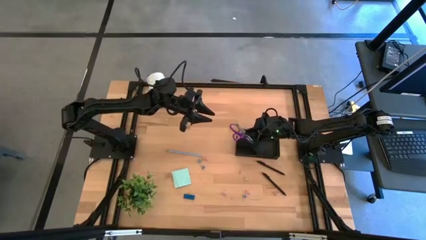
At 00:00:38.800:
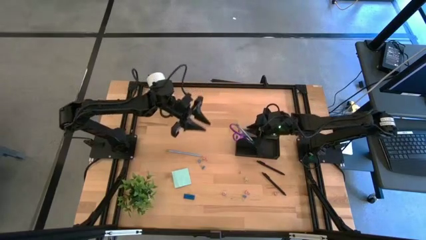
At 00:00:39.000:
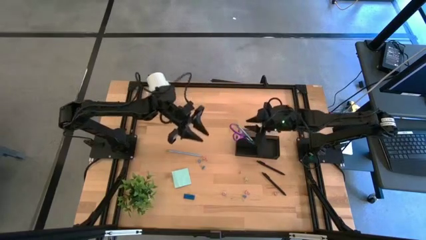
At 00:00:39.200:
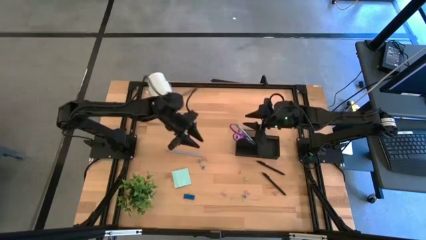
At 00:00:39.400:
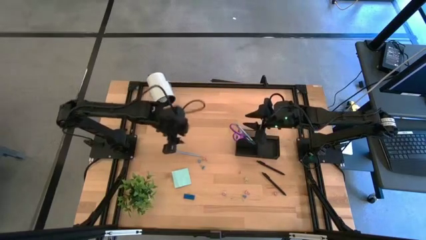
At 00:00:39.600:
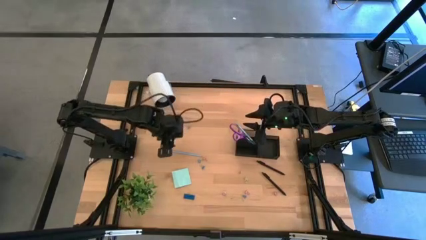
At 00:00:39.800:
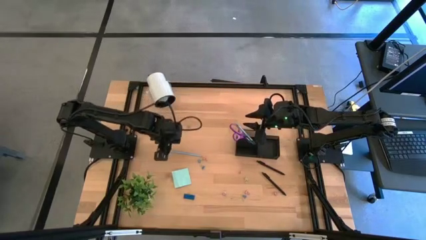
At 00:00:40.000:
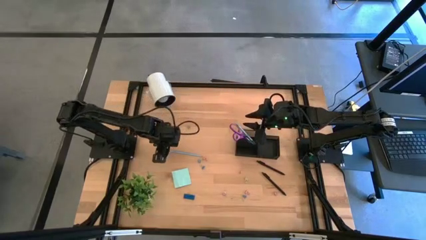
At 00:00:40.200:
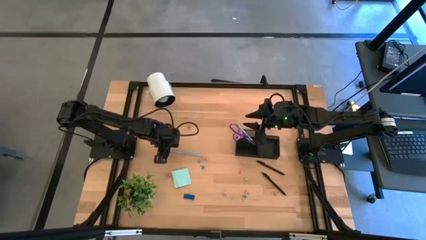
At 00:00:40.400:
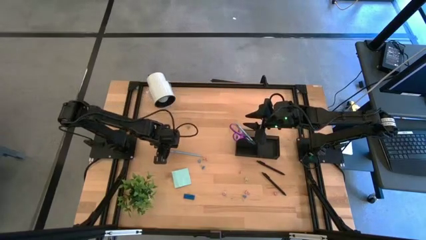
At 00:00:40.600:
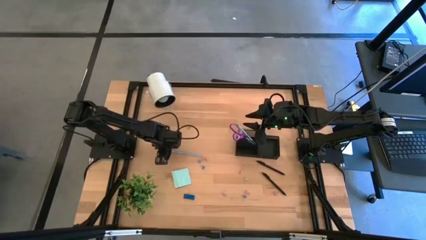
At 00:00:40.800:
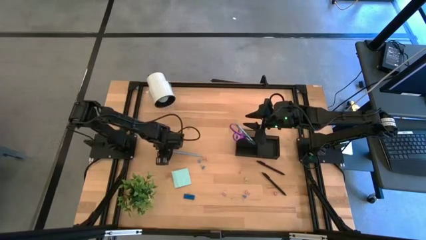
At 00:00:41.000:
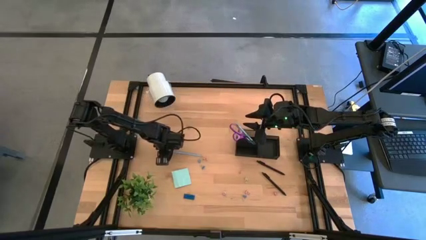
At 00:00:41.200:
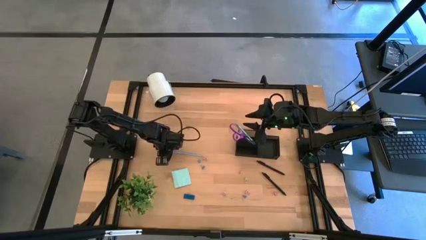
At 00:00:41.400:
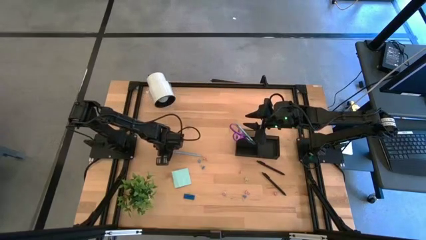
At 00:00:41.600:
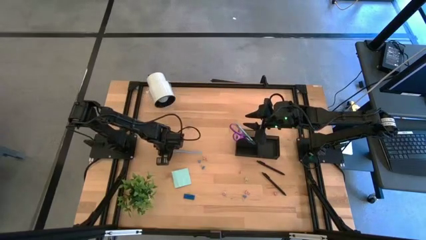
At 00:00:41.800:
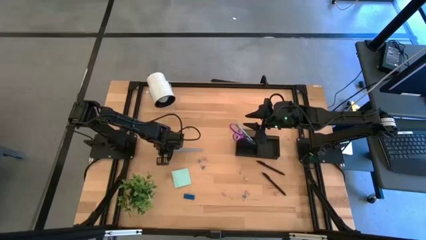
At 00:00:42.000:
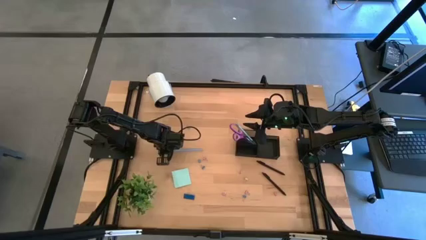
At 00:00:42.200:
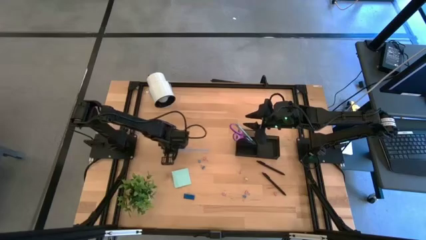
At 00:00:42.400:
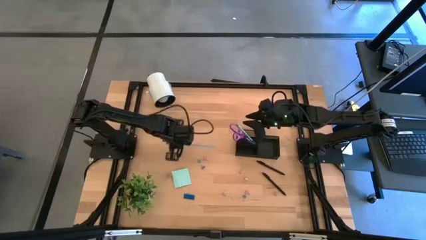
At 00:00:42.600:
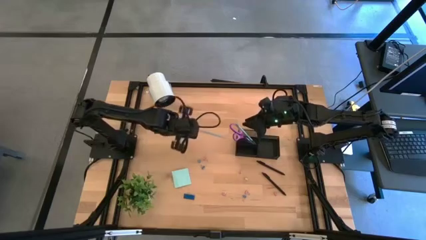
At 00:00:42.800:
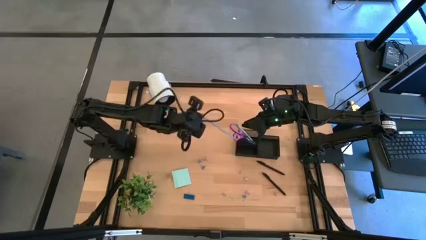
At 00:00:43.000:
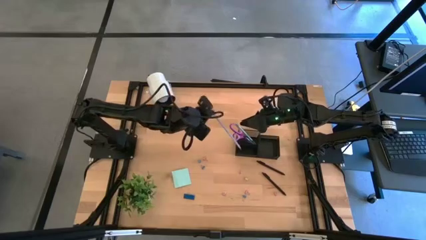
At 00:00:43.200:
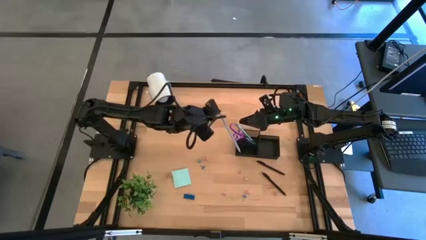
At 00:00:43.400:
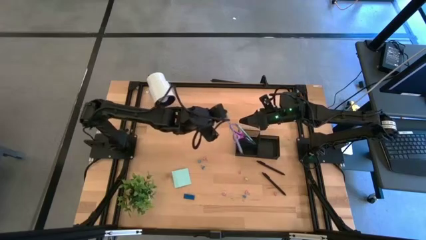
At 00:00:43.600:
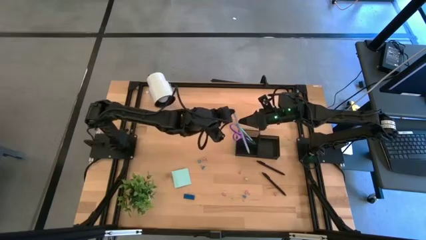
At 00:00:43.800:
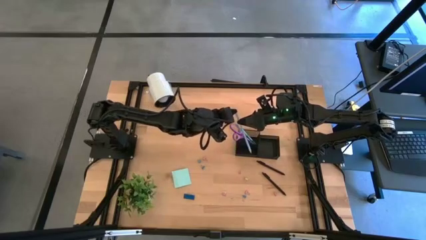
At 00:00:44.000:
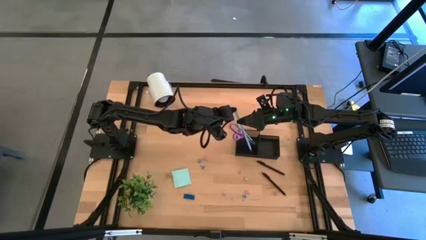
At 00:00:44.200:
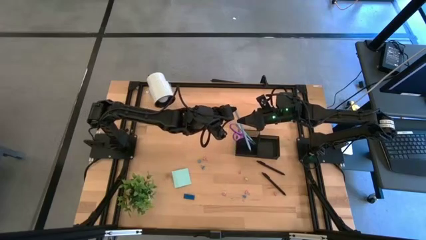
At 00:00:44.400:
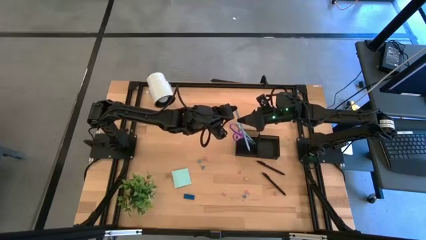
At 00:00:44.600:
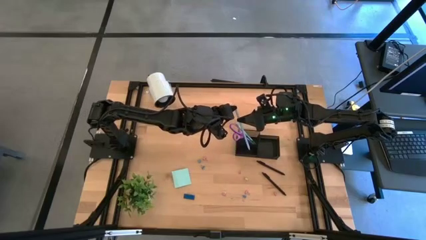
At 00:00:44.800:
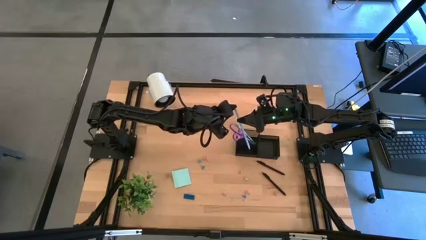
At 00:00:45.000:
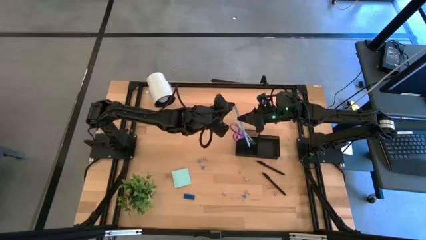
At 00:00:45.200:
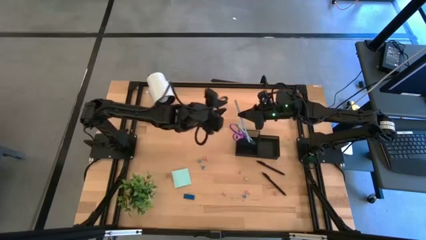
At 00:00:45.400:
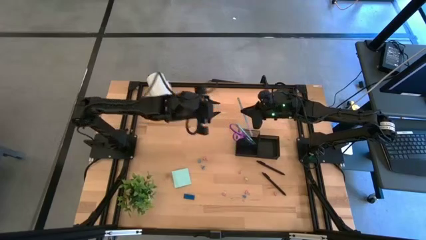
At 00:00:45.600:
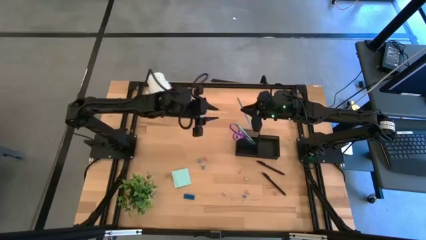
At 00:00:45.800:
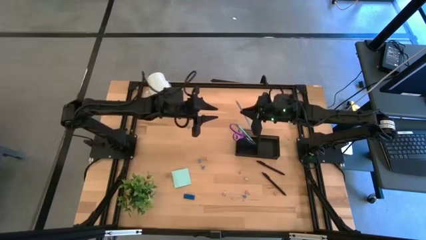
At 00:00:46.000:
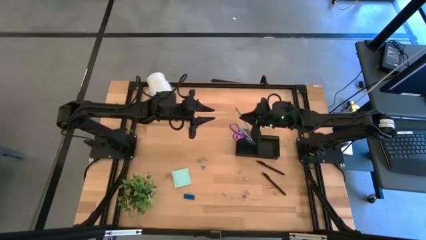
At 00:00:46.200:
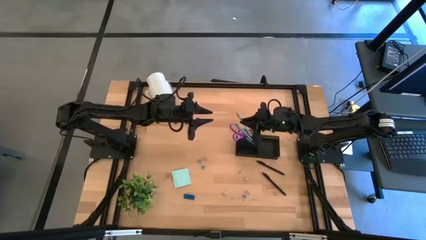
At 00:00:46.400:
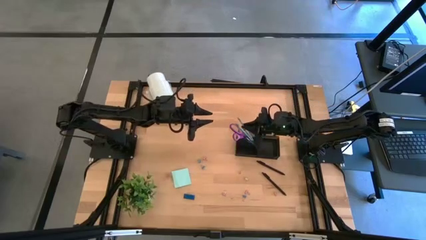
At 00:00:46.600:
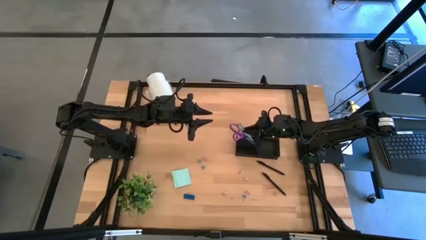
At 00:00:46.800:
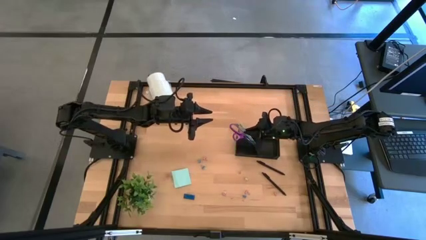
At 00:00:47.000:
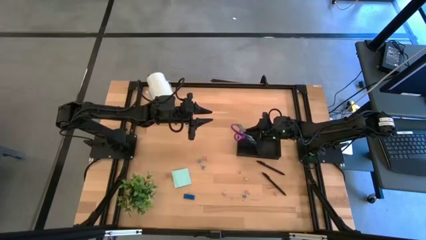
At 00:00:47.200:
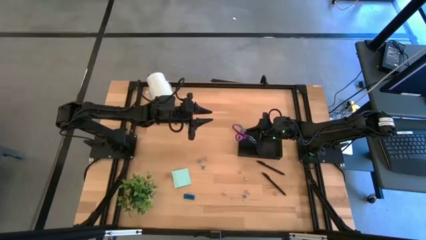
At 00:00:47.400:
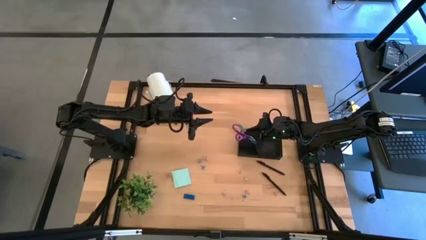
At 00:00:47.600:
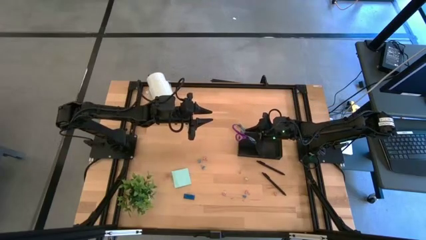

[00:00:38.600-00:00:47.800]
Task: Pick and place office supplies into organizer
Put the blue pencil into the black desk organizer

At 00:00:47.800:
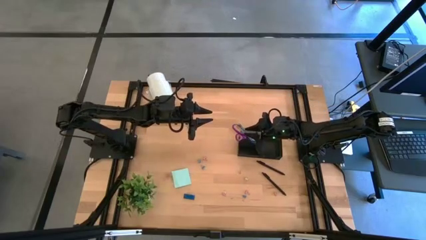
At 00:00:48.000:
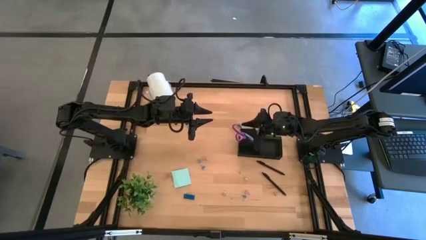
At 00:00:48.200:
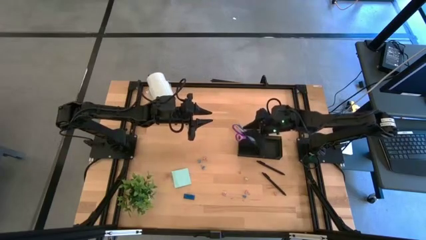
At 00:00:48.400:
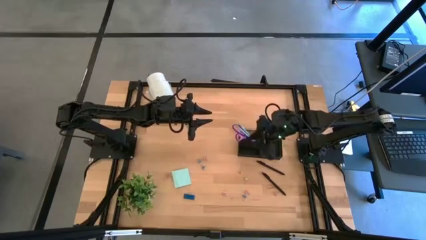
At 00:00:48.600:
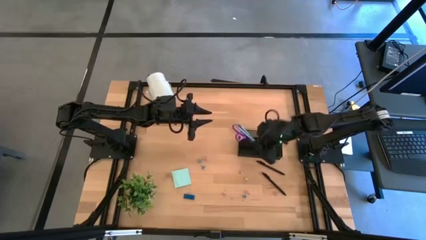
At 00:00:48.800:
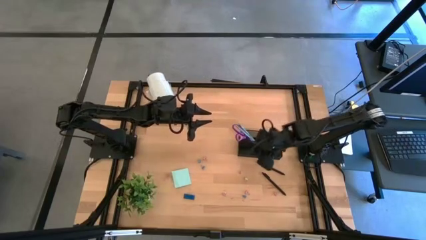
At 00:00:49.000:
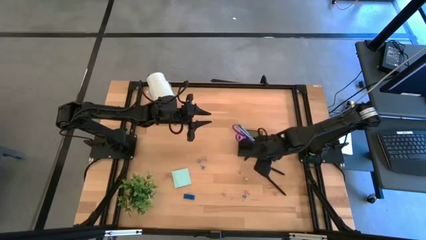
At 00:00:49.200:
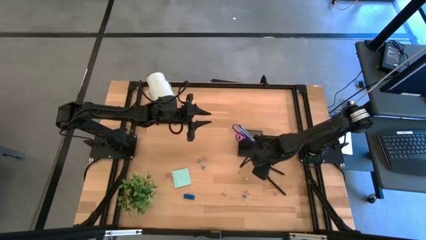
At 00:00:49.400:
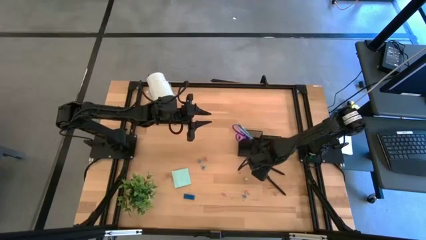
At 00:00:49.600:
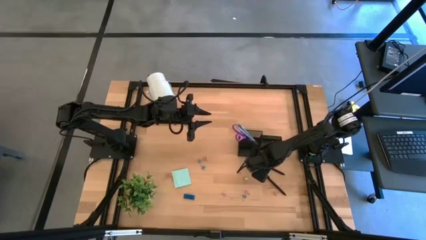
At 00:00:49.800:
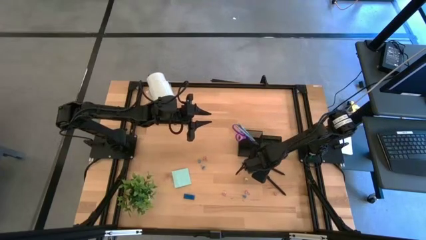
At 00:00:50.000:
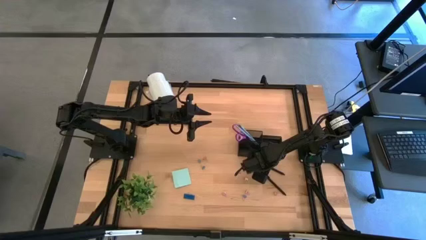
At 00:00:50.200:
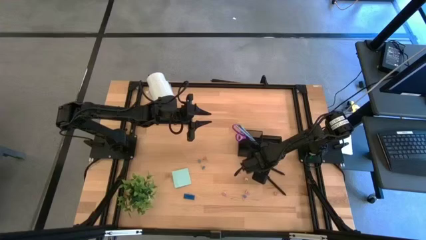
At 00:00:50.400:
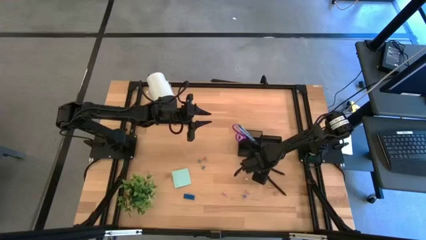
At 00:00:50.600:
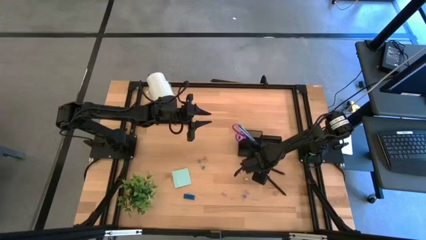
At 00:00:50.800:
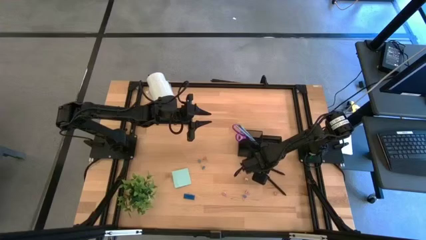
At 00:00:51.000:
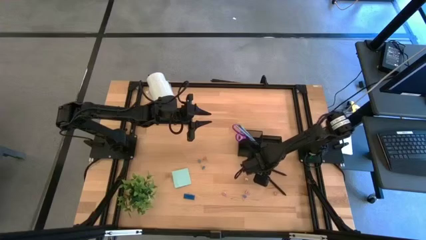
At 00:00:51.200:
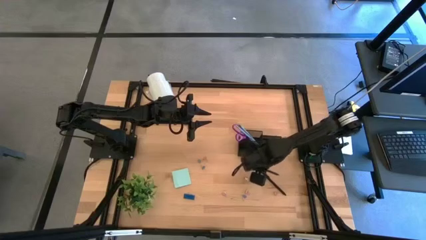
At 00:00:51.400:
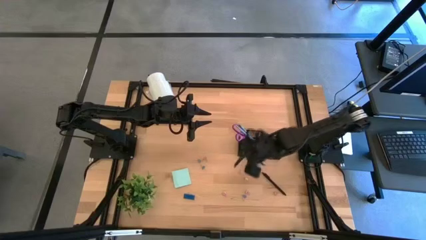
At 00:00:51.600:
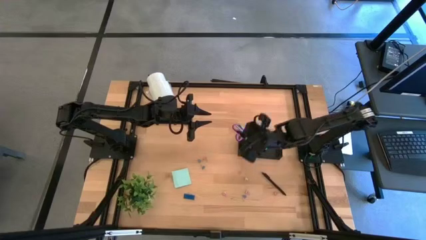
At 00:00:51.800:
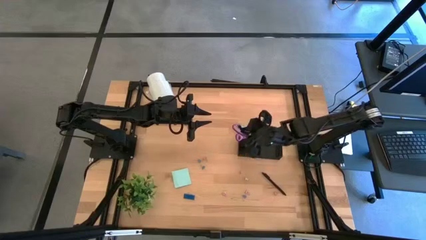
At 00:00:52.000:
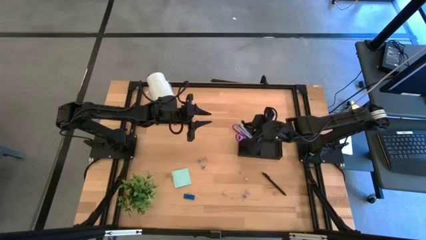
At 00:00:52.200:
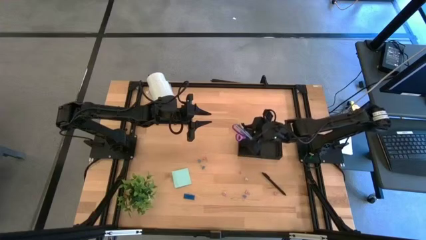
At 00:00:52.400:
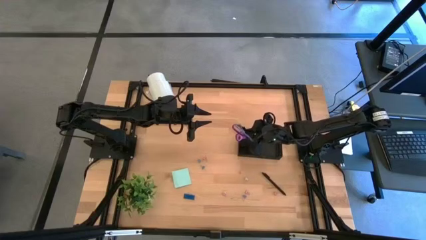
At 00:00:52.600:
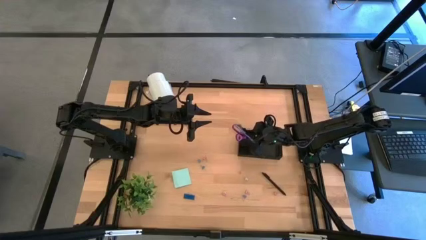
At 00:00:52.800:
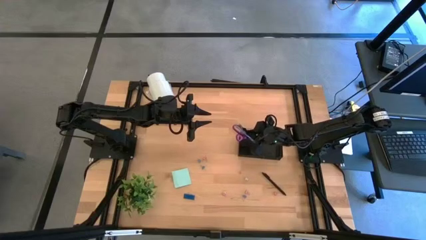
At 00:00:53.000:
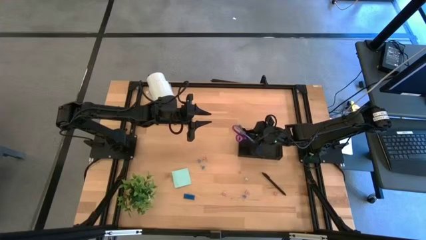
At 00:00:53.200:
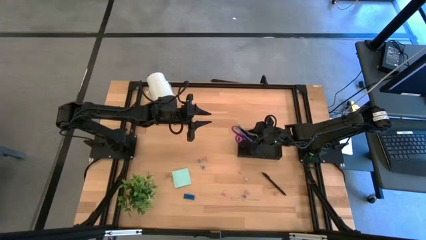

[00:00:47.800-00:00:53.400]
Put the black pen into the black desk organizer
